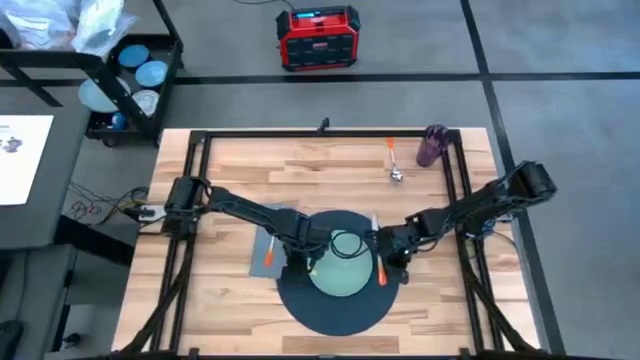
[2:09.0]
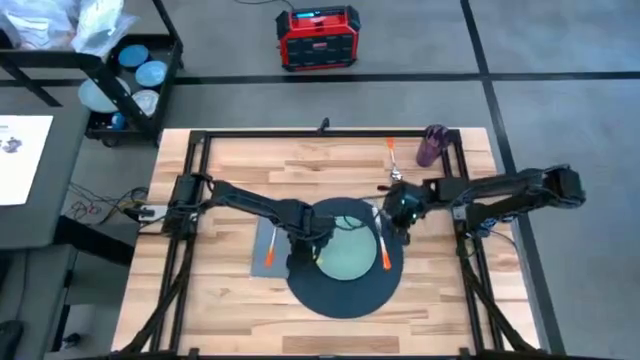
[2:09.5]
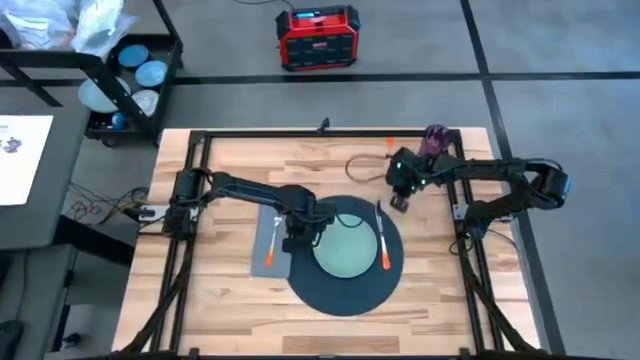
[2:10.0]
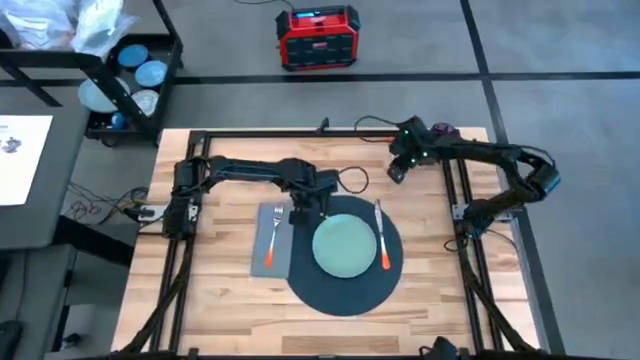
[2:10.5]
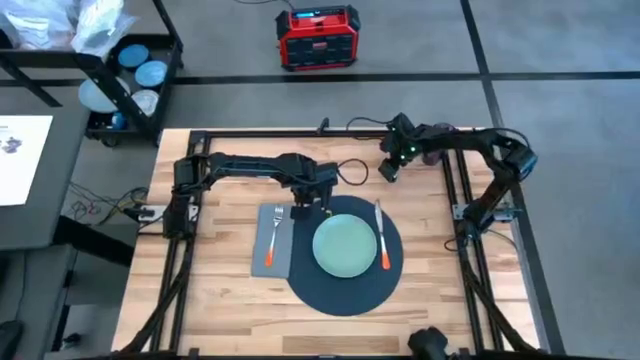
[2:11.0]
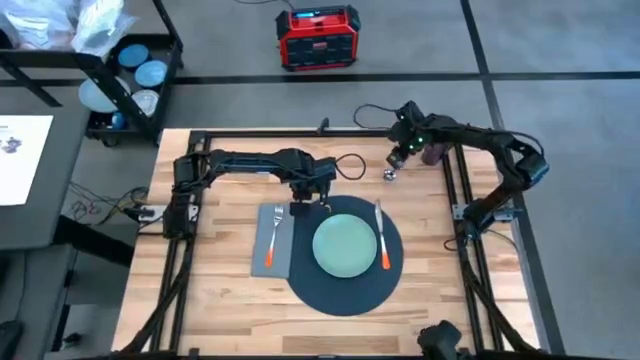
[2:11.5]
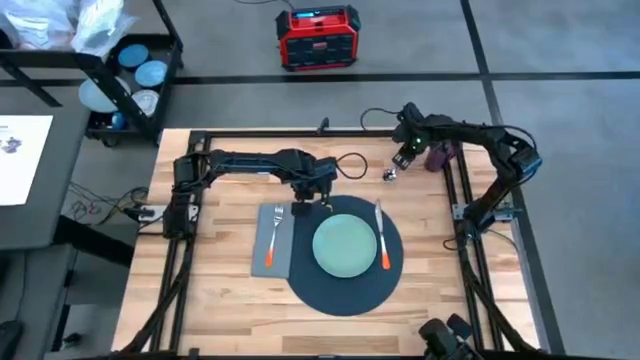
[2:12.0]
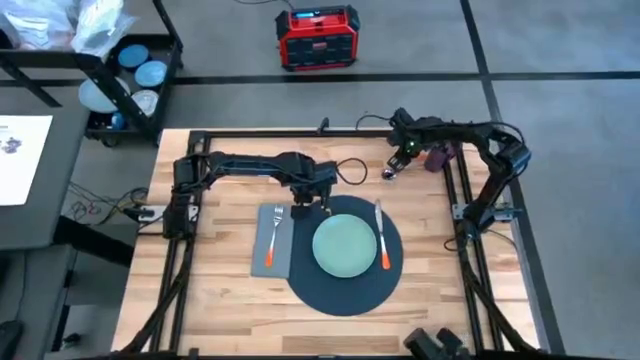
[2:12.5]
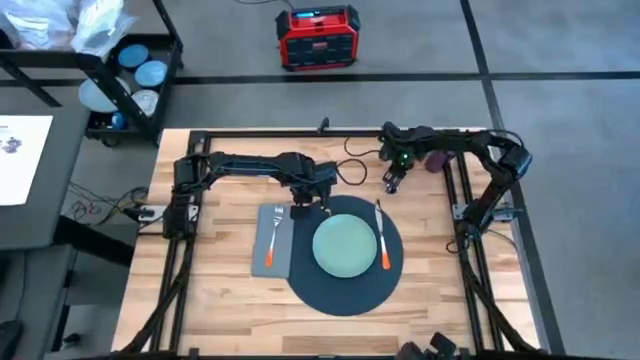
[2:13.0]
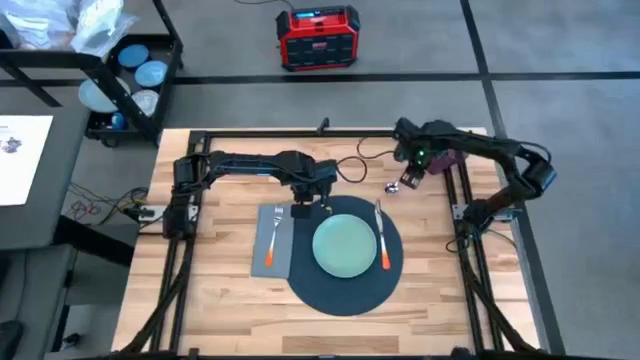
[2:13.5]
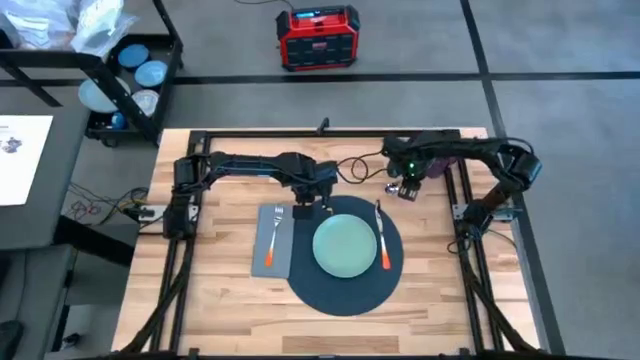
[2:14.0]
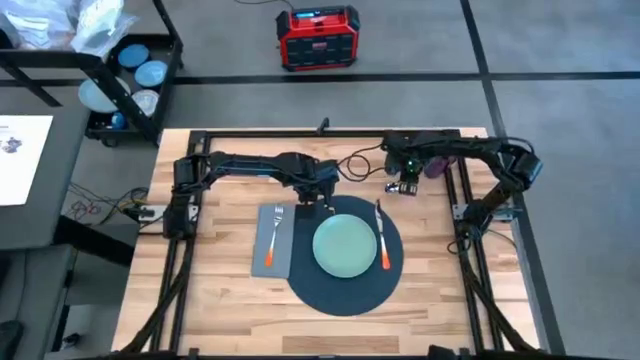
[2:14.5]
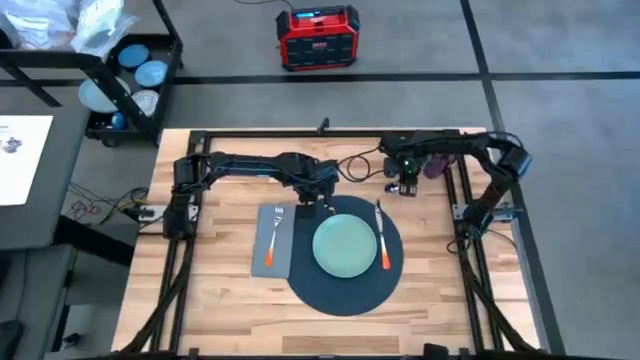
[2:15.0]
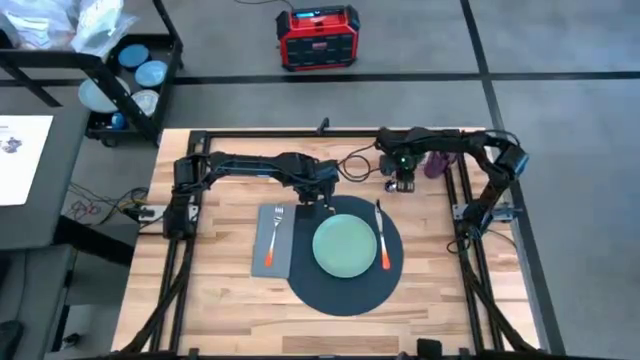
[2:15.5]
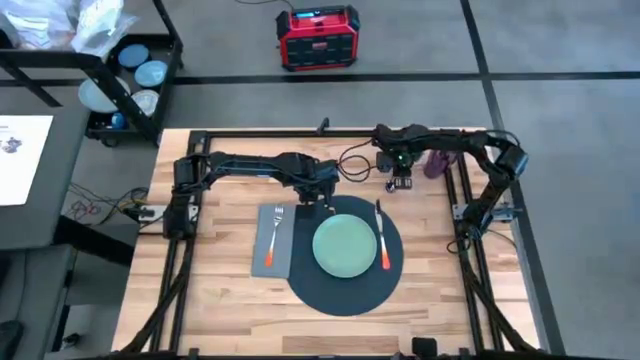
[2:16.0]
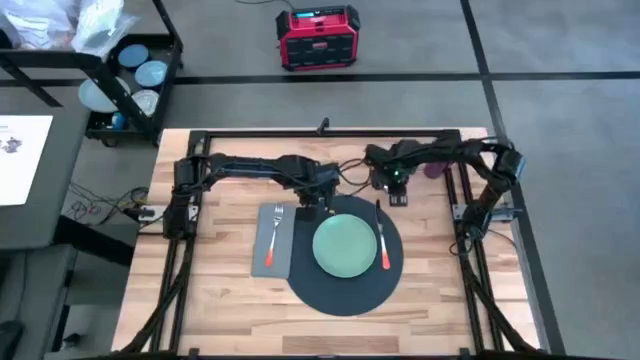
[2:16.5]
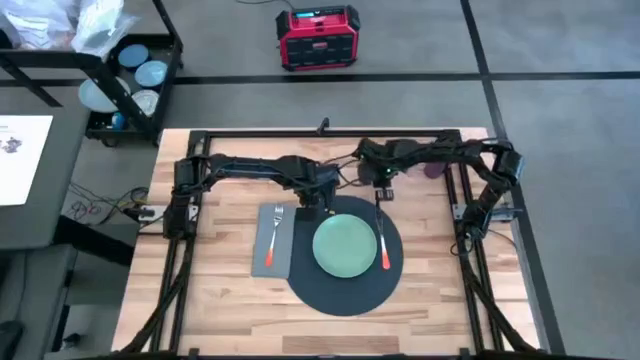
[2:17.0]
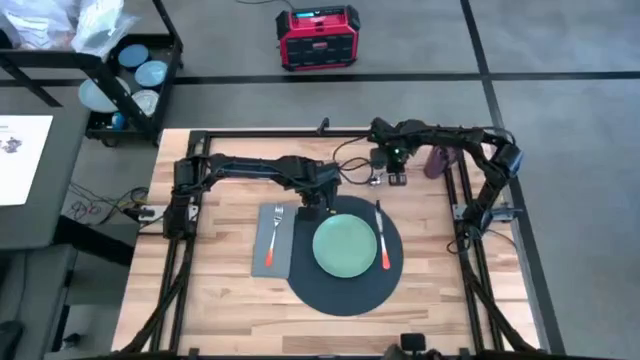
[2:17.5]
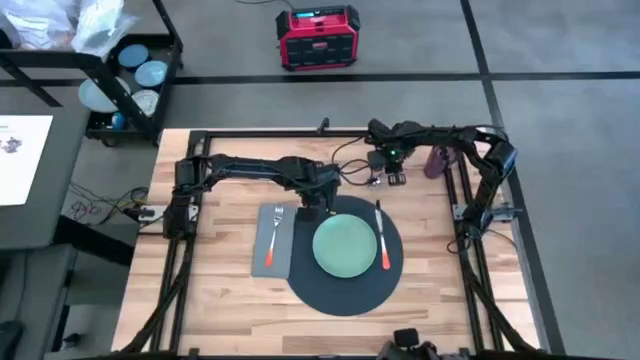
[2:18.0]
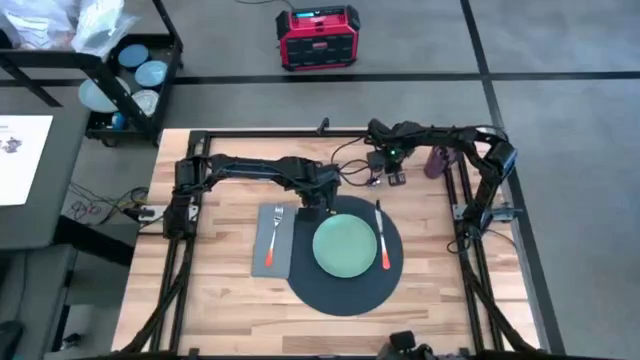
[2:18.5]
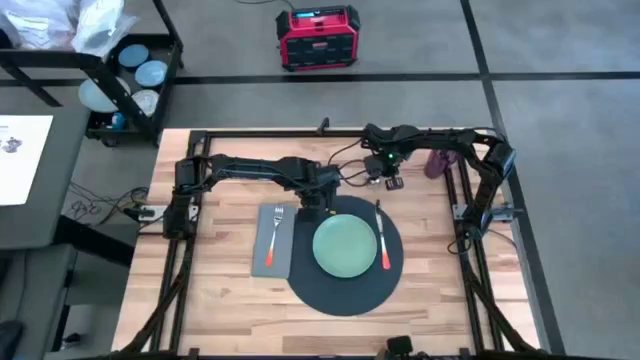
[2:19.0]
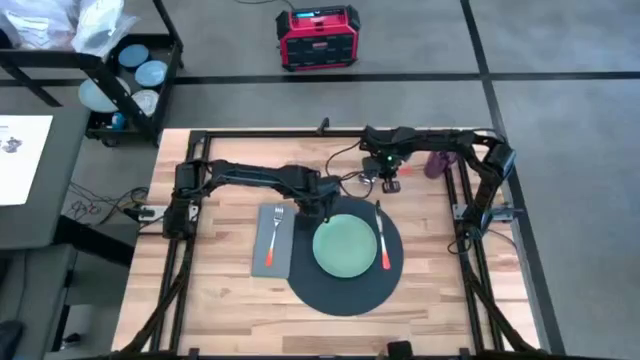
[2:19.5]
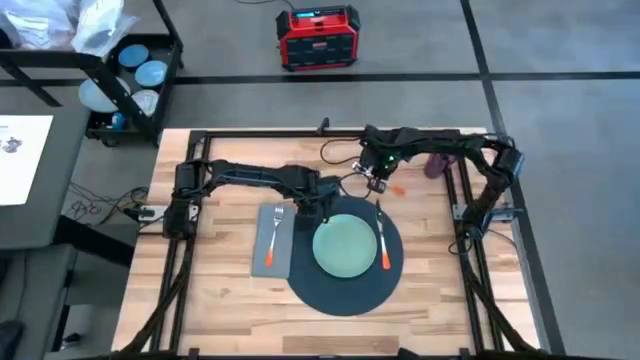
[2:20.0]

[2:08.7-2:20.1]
Task: Set table place
Put the orange spoon on the blue placemat

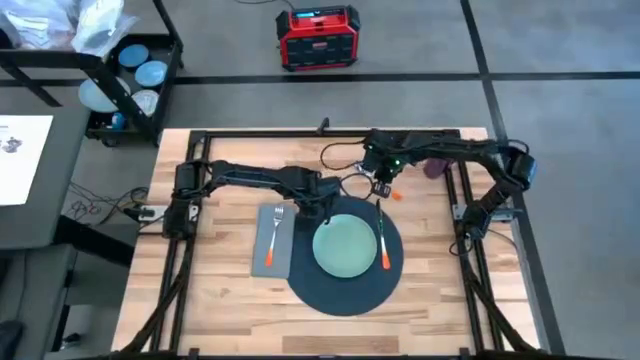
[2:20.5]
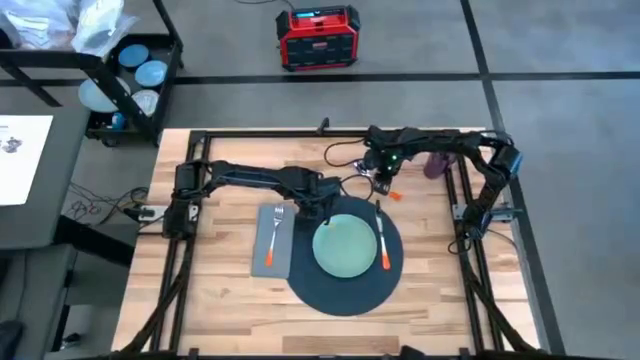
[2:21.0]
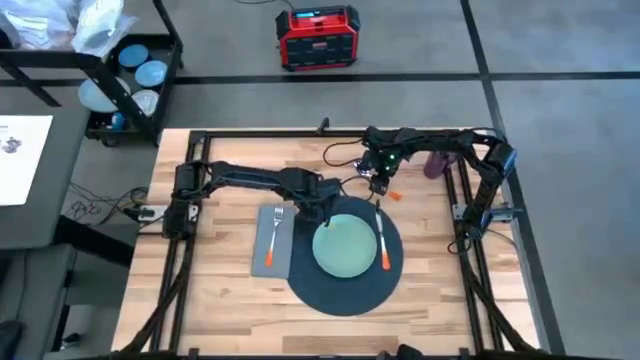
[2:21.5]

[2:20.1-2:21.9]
Put the orange spoon on the blue placemat

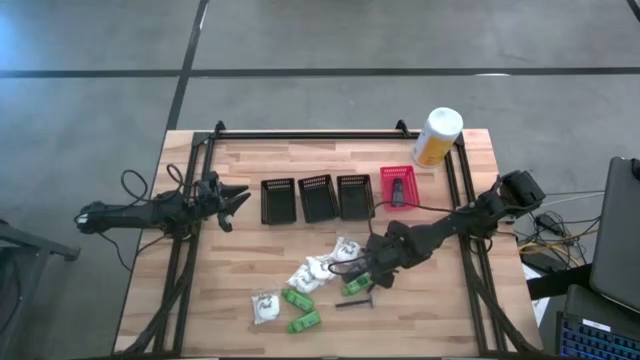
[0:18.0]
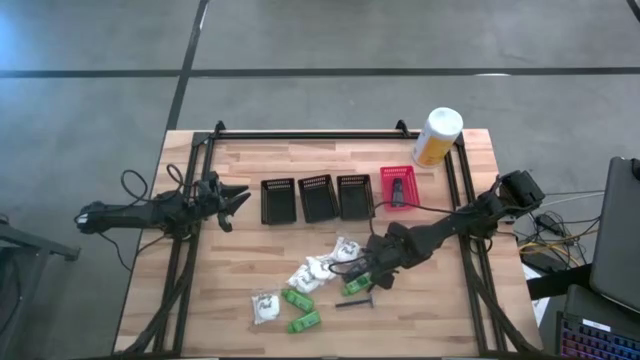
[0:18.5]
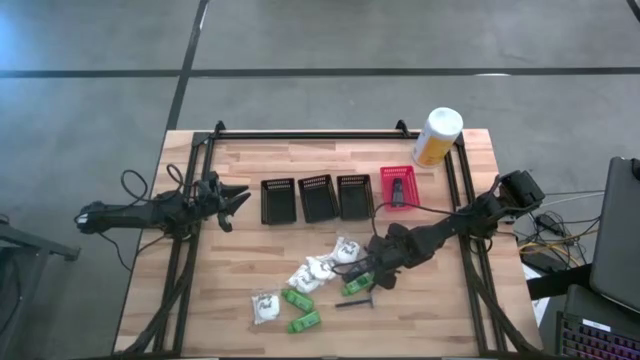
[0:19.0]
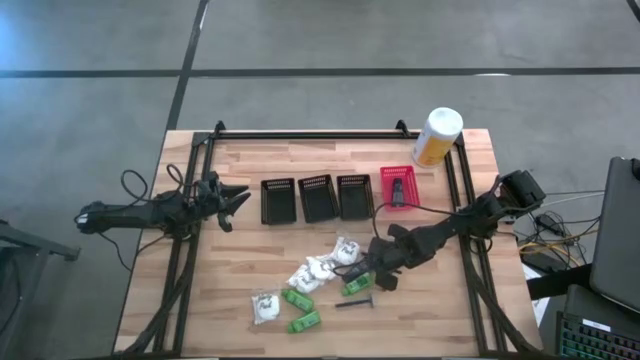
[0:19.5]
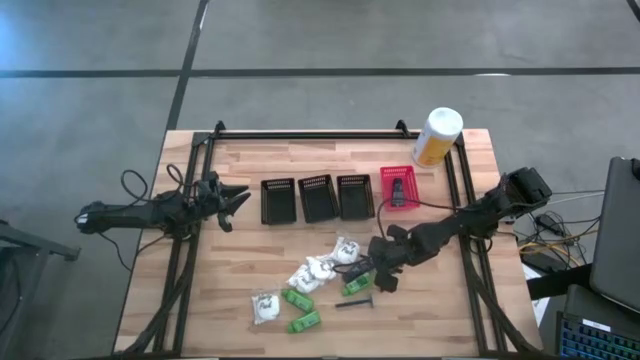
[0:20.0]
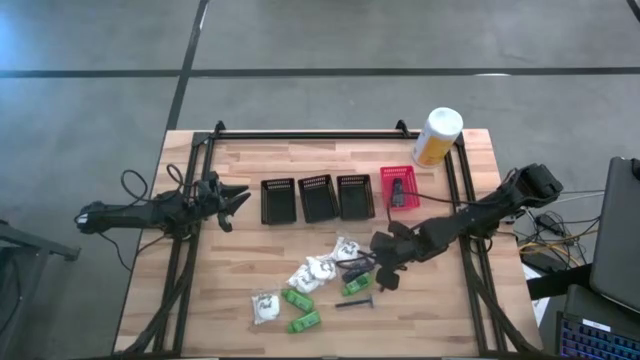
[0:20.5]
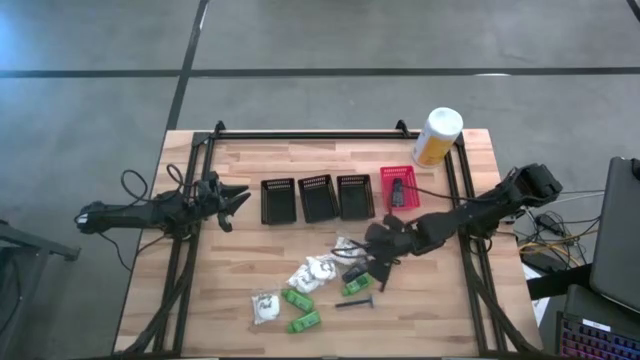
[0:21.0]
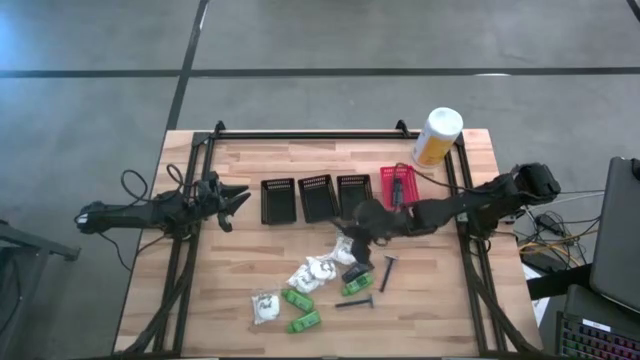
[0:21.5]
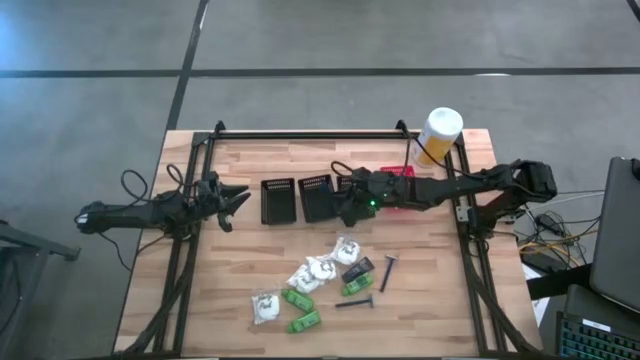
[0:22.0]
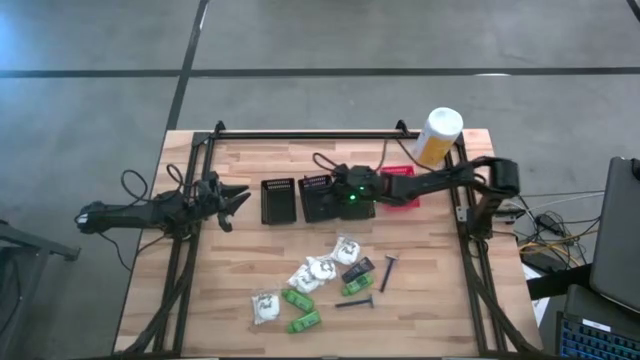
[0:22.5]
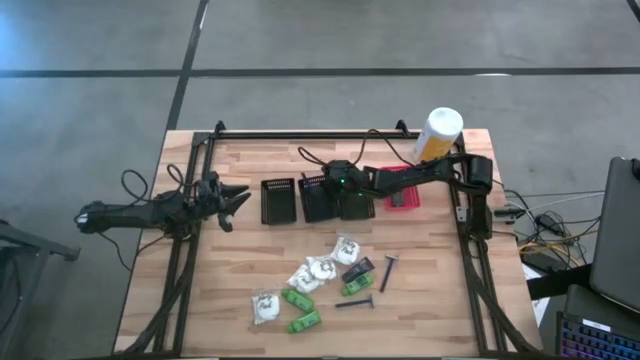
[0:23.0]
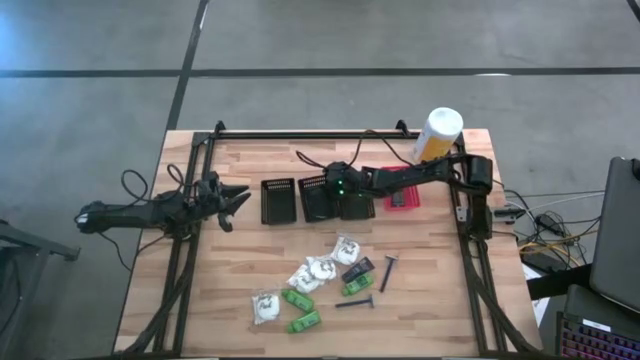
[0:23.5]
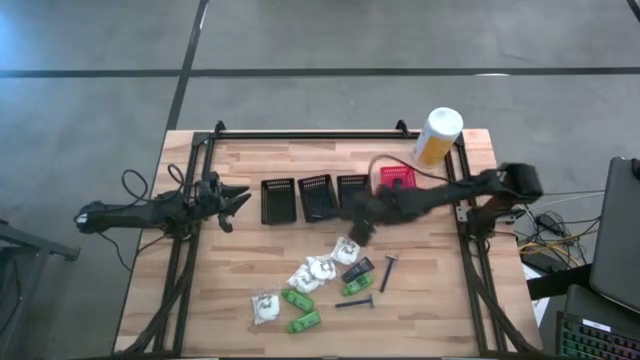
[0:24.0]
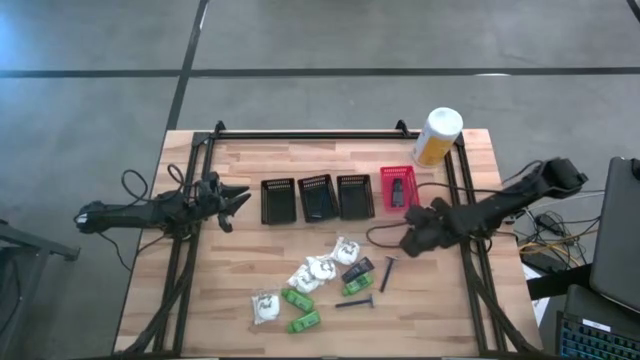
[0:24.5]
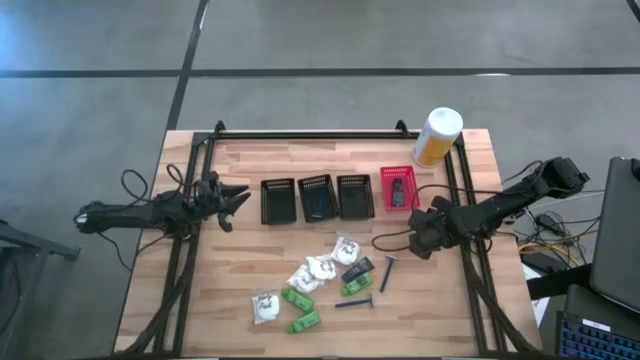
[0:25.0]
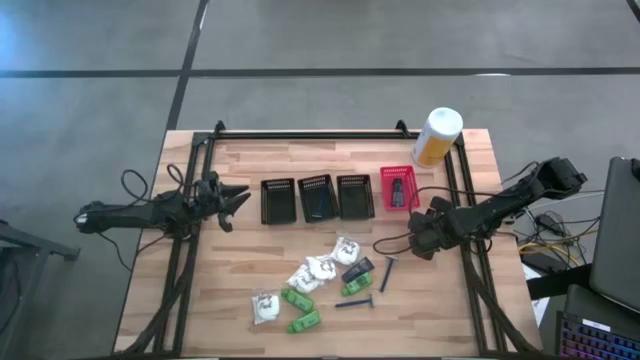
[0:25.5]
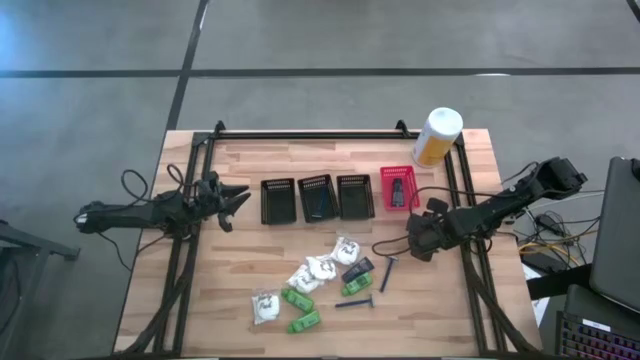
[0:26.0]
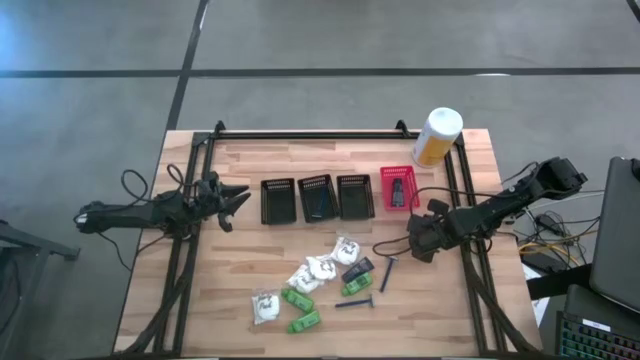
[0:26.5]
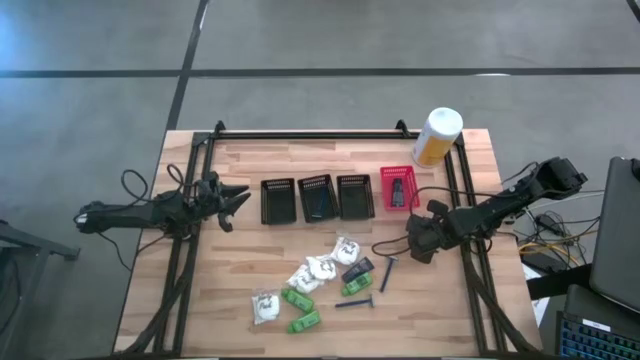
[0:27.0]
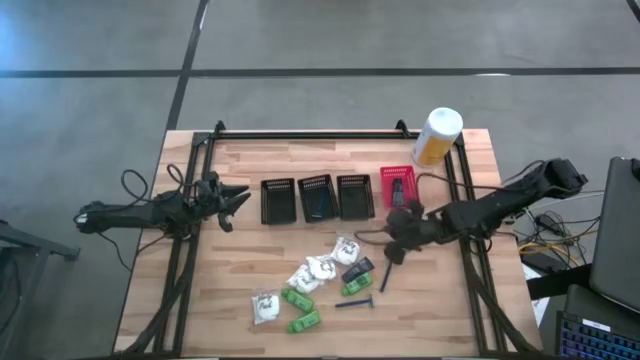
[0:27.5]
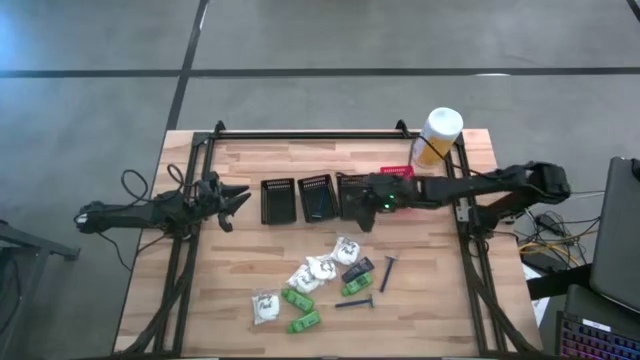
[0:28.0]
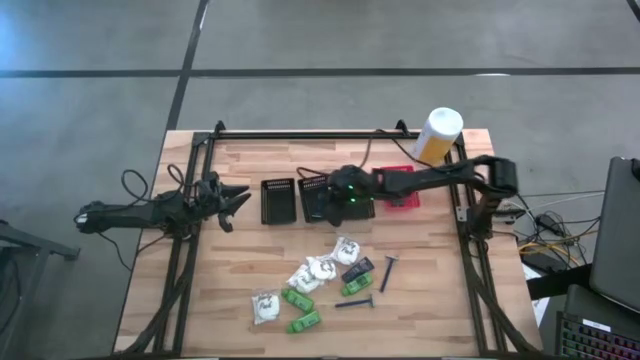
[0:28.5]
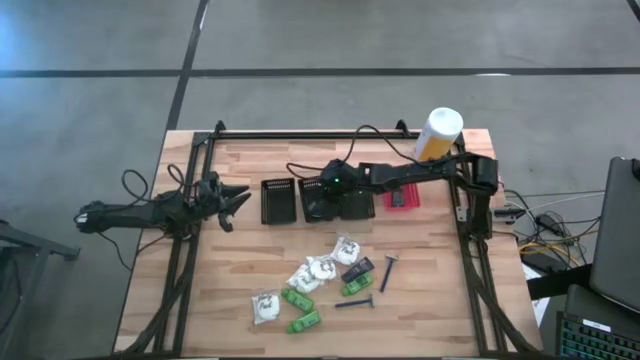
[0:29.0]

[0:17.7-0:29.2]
Task: Pick & Place Travel size toiletries
Put the top right blue razor into the middle black bin
